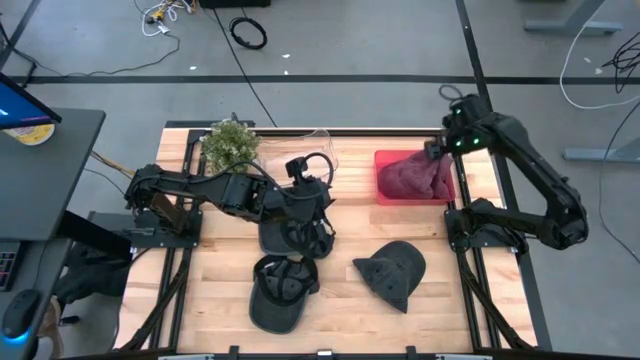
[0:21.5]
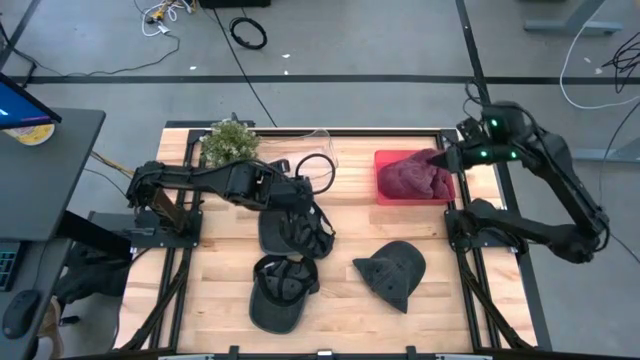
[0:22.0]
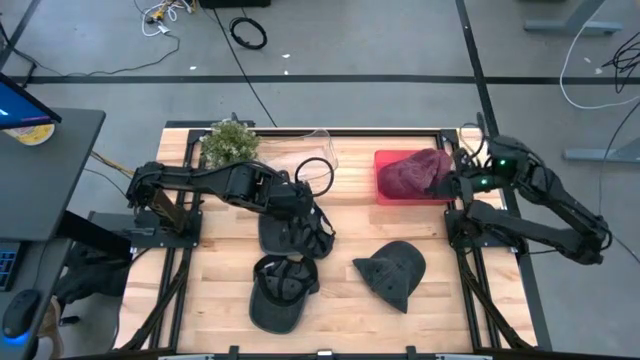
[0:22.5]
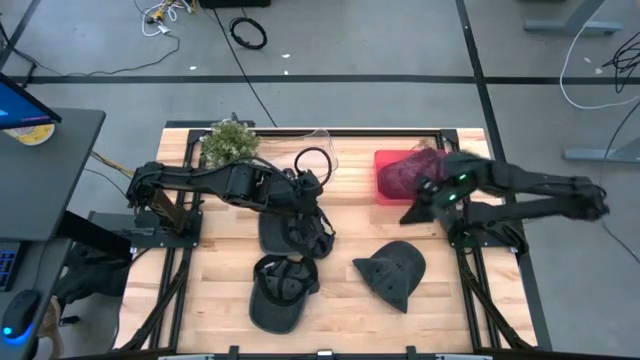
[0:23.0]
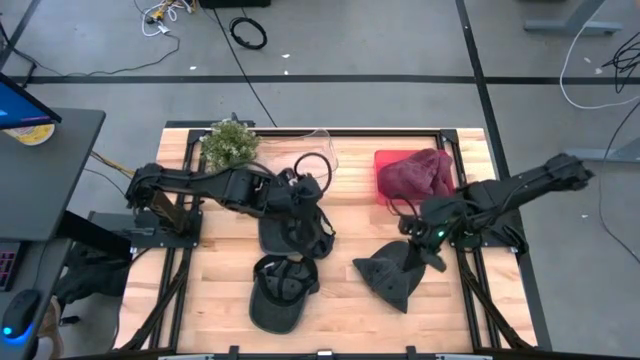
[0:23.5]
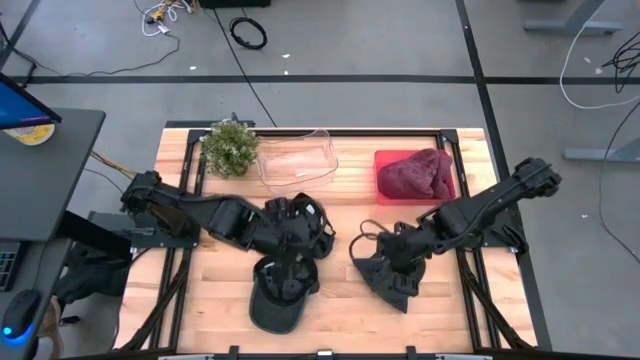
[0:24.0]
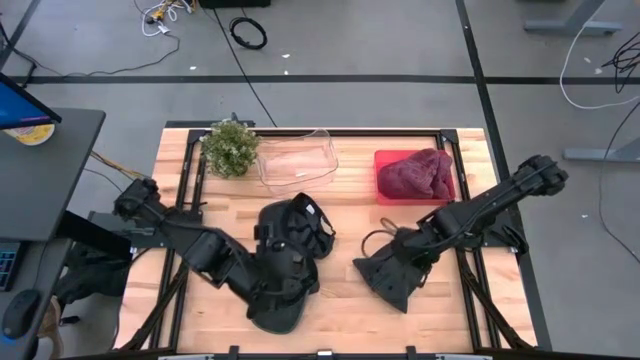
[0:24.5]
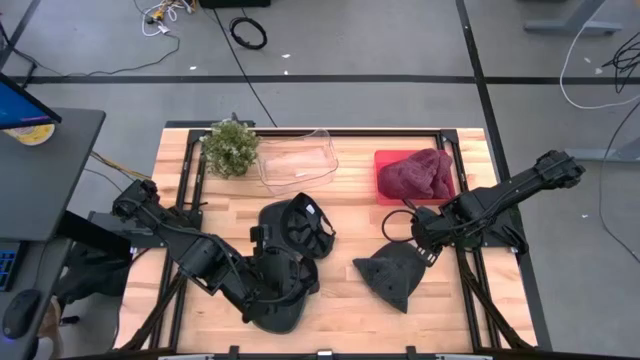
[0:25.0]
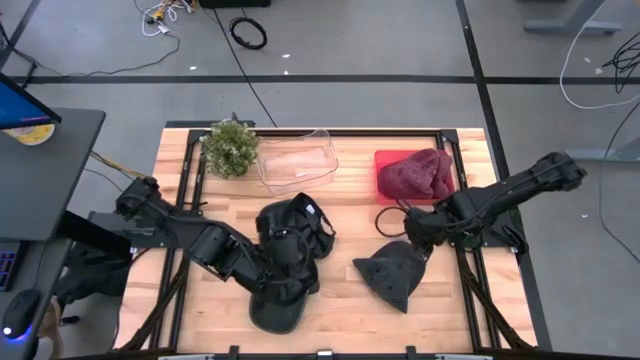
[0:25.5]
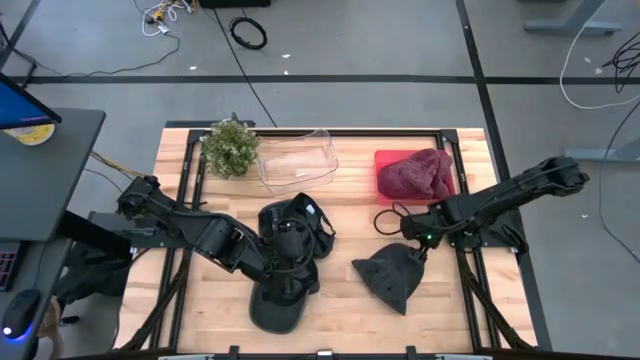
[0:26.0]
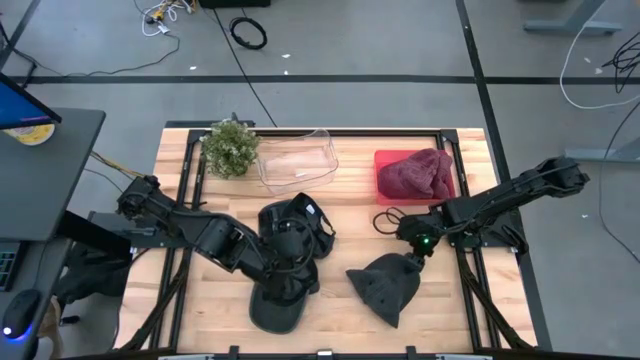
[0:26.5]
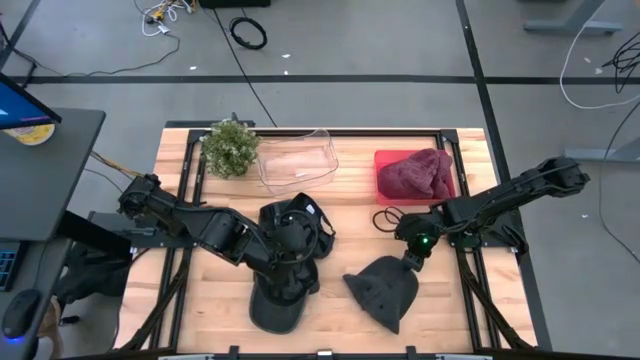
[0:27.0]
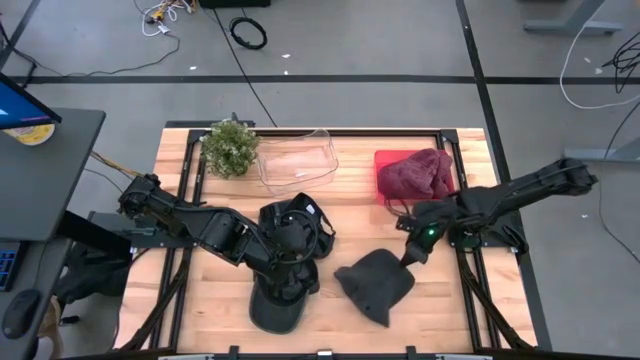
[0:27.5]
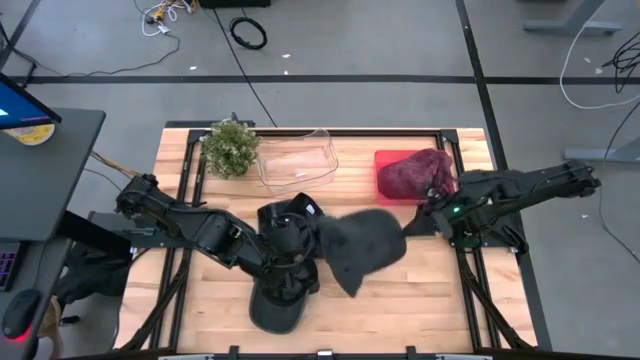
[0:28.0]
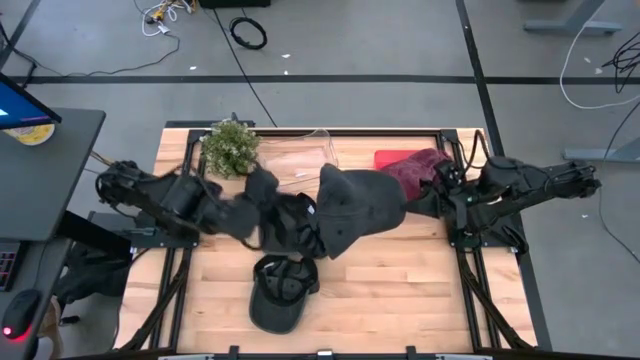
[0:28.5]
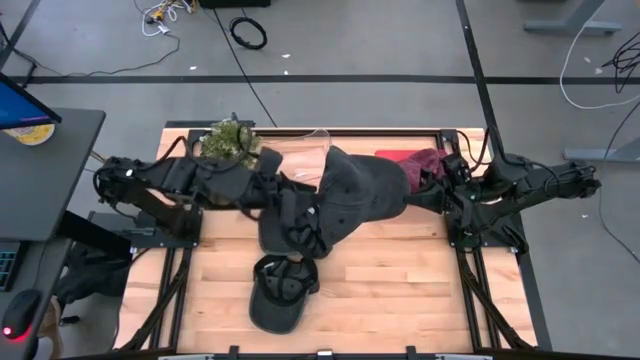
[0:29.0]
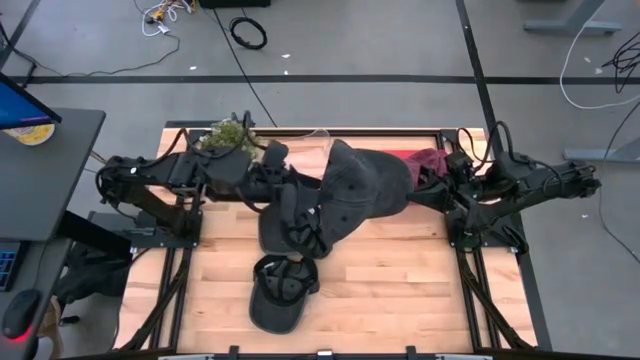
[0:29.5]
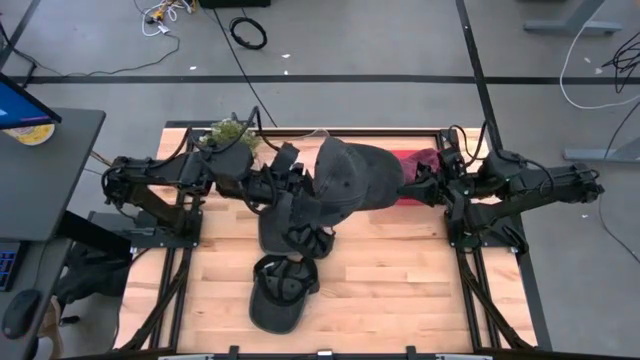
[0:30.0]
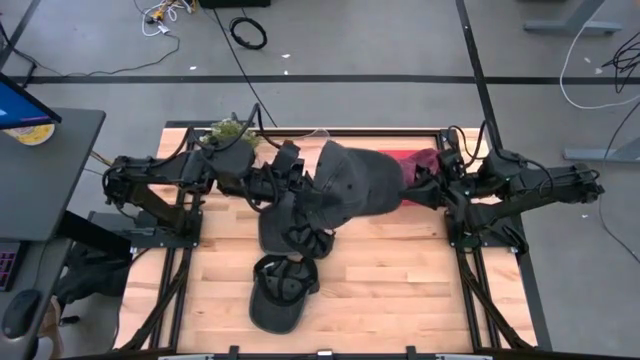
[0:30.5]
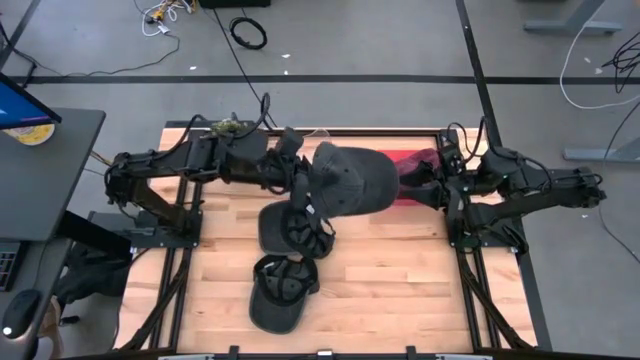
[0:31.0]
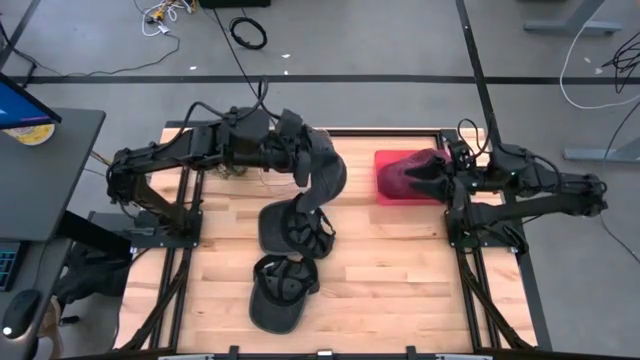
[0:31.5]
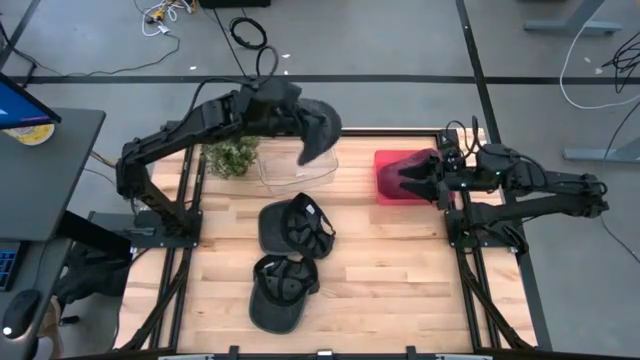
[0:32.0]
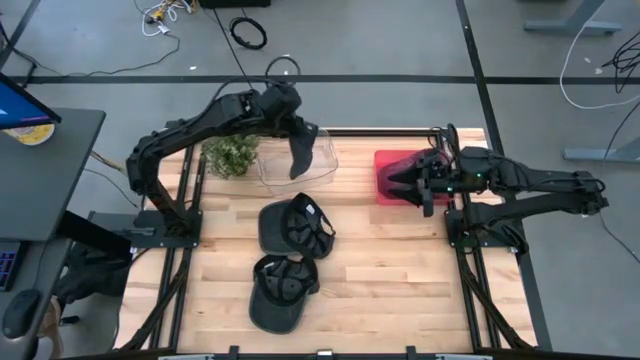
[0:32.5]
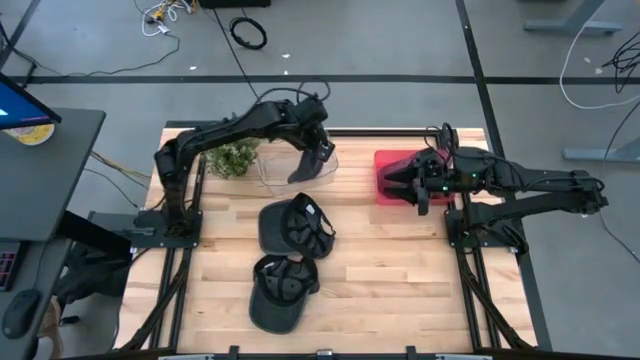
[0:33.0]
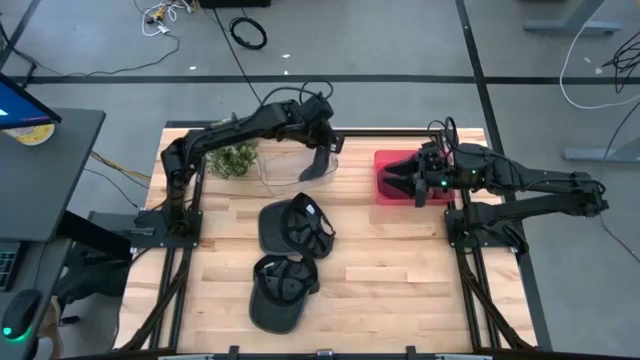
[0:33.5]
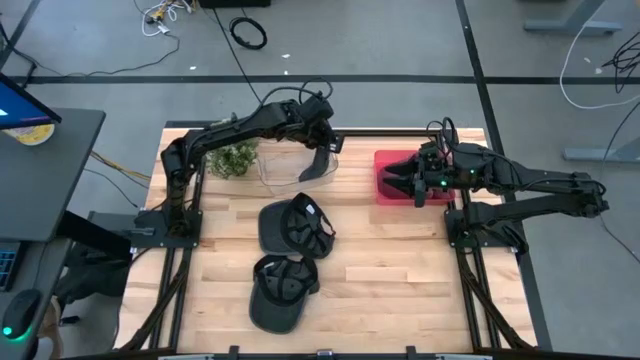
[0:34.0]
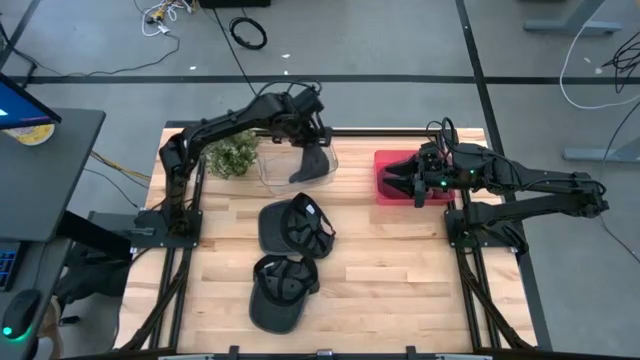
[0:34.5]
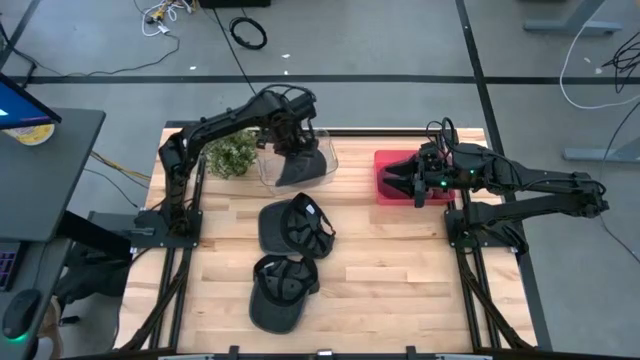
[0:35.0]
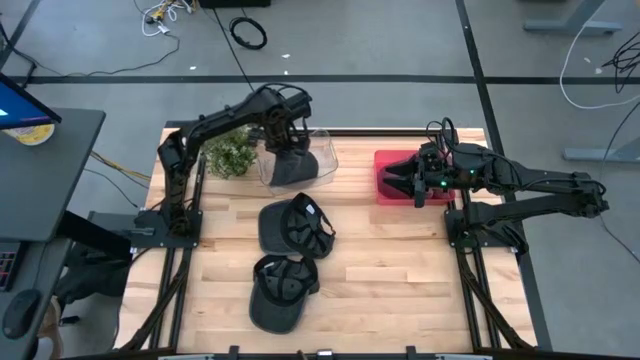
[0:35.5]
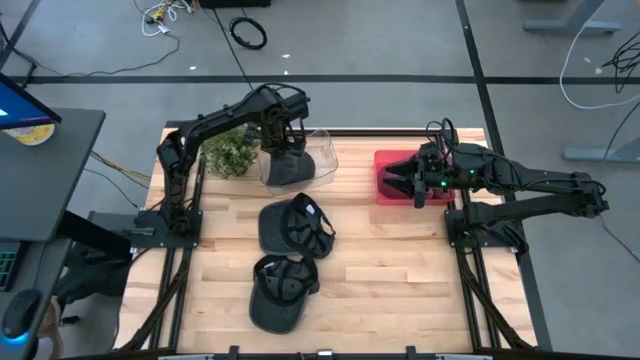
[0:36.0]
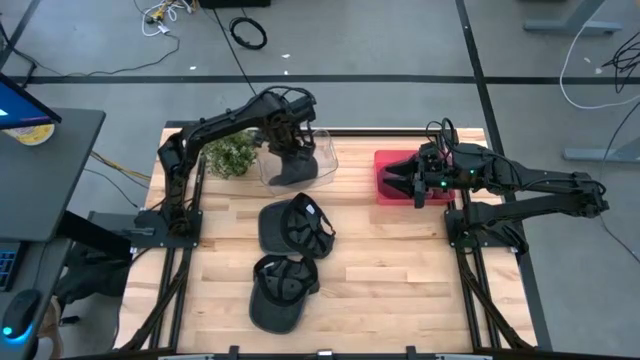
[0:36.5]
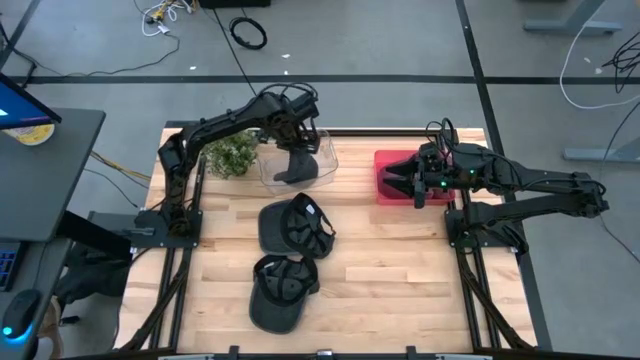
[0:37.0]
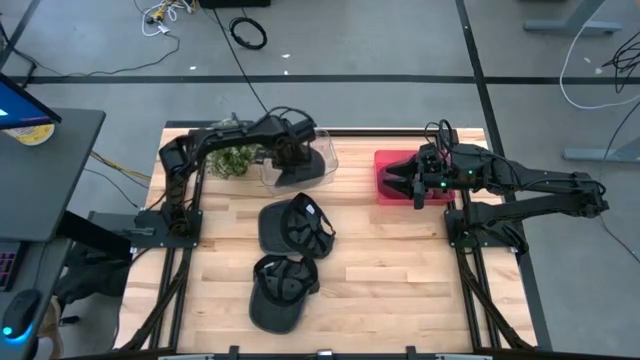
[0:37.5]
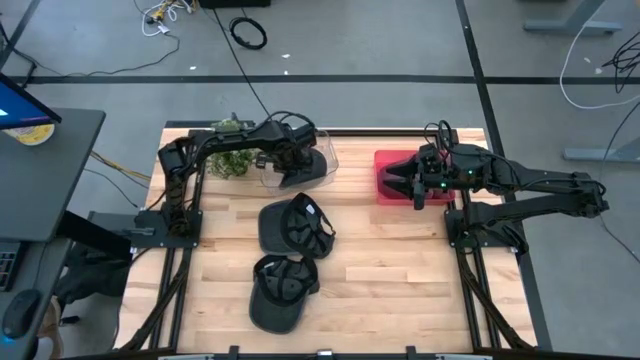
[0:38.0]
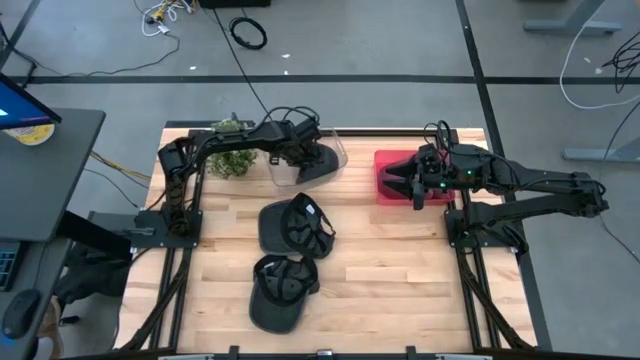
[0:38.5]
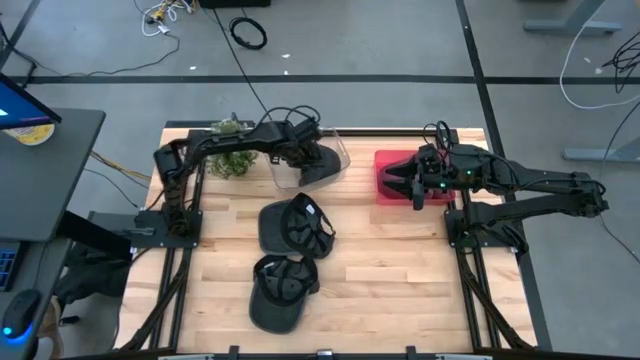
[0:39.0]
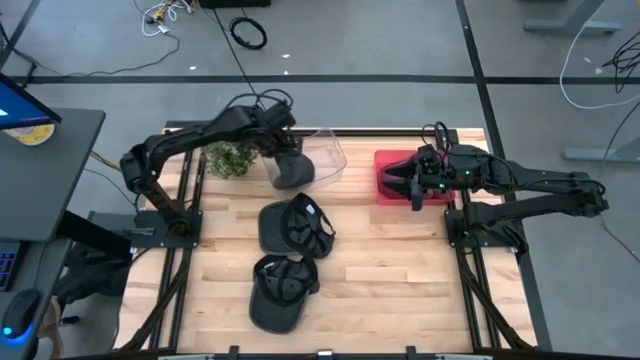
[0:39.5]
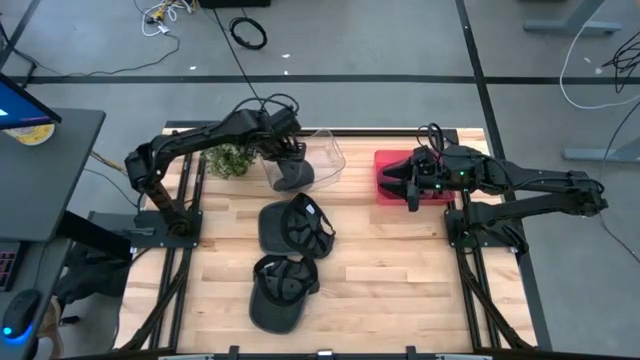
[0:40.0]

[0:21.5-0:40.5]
Task: Pick & Place hat
Put the right black cap into the transparent bin
